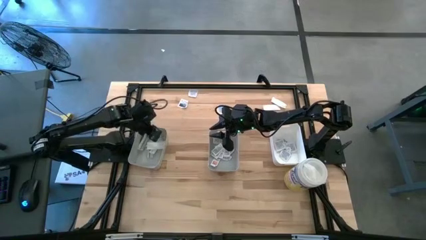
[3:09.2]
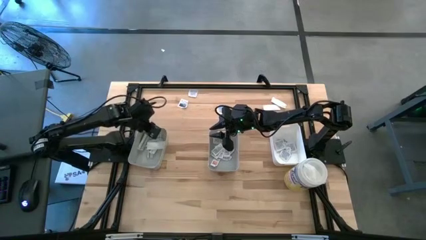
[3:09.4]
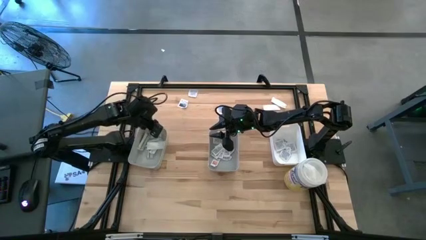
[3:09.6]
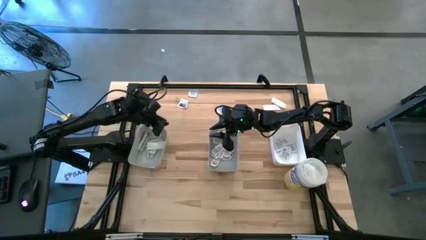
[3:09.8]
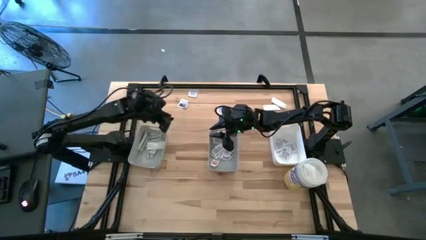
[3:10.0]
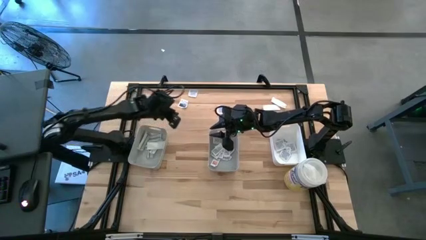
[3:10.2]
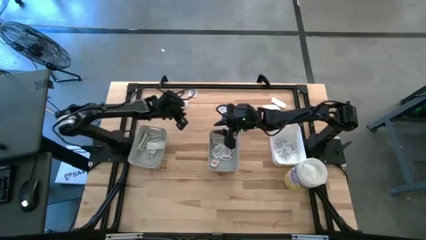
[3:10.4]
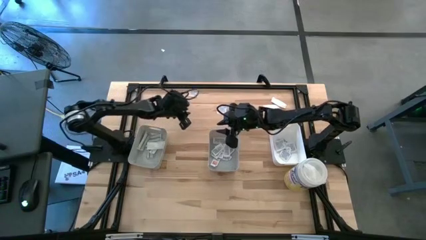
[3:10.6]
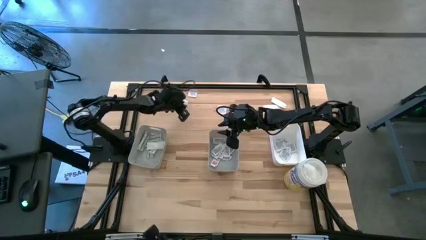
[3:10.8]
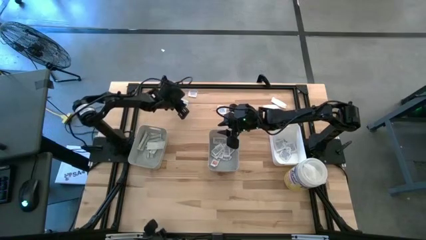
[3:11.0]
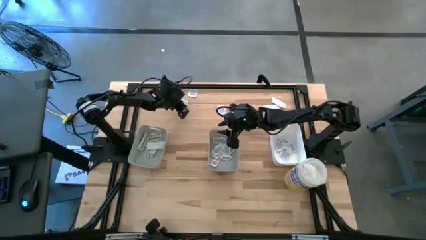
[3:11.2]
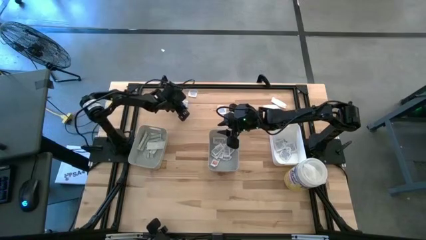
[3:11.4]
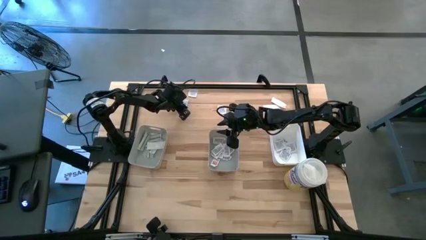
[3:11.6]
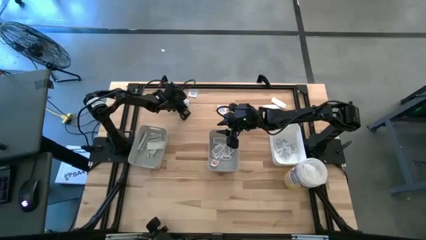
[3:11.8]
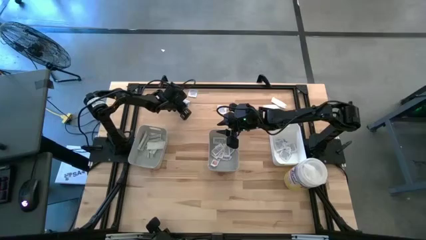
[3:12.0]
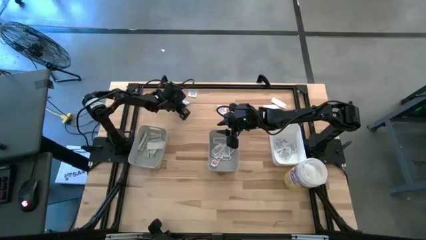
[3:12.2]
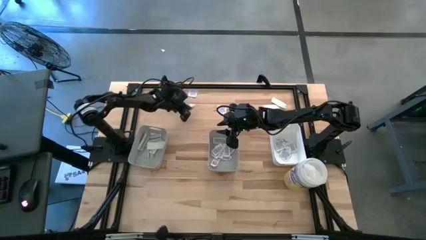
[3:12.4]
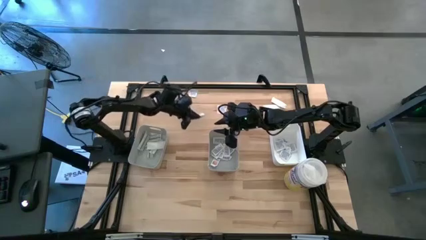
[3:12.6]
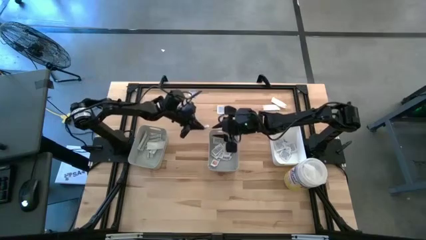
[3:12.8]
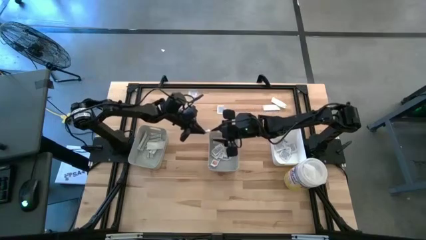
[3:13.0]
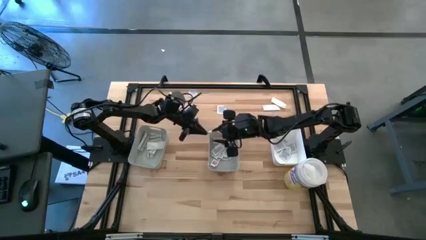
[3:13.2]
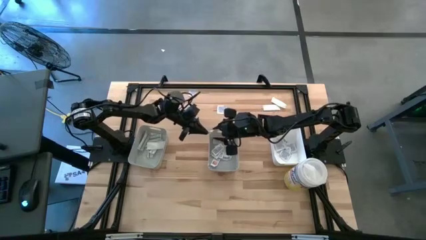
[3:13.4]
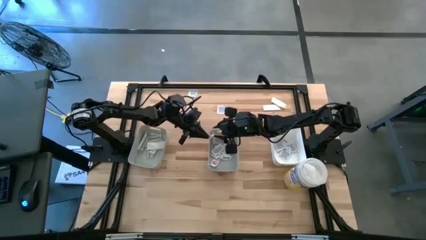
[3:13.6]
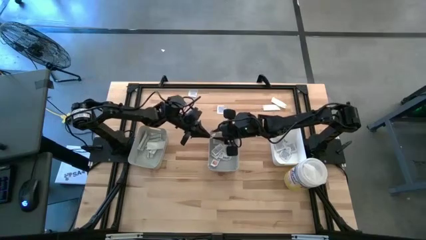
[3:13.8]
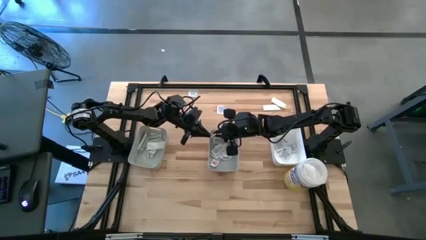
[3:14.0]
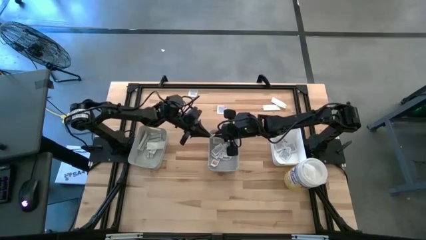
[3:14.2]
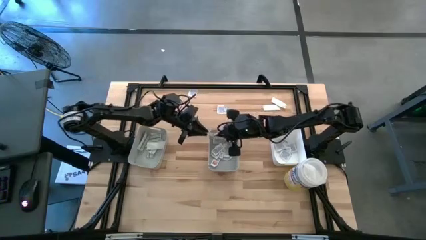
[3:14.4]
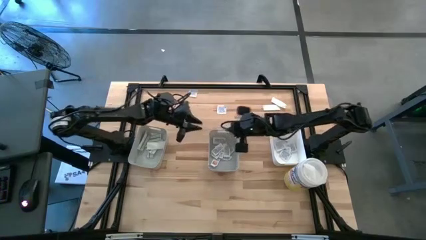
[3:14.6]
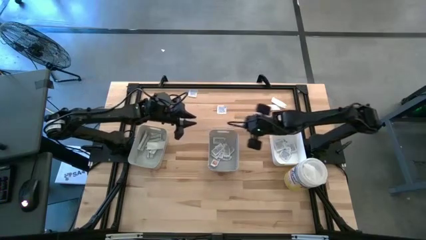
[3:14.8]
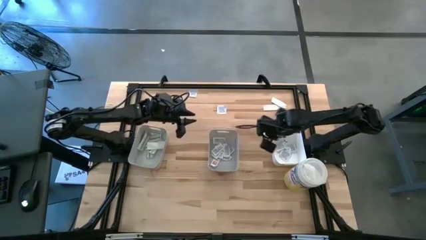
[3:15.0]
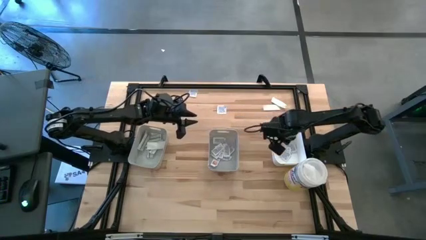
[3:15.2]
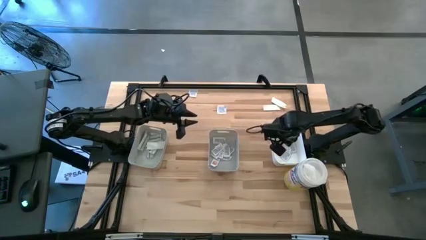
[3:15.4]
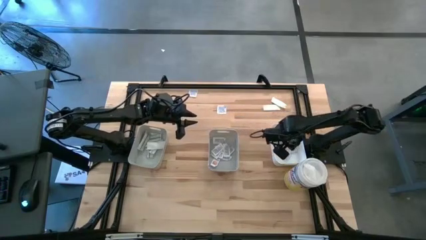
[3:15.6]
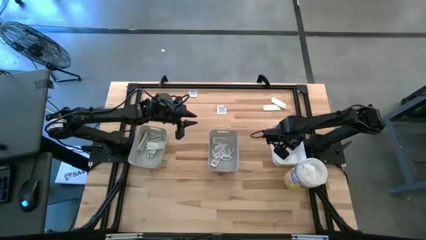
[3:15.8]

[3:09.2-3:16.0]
Task: Pick & Place First Aid Supplies
Put the alcohol pad into the white bin

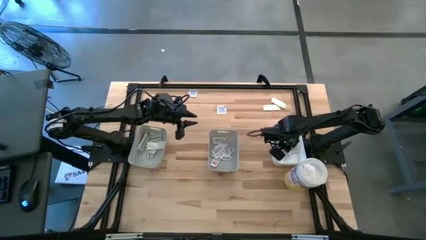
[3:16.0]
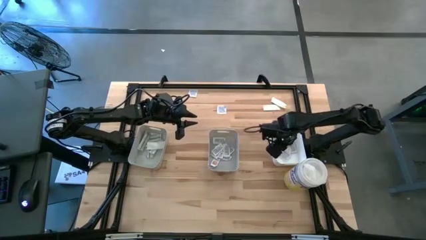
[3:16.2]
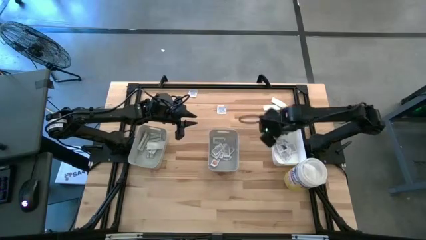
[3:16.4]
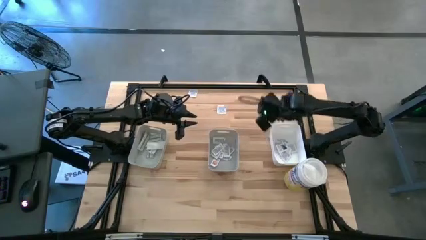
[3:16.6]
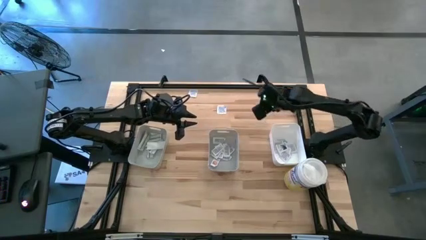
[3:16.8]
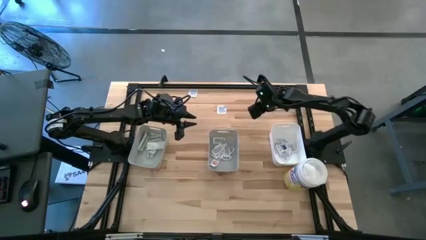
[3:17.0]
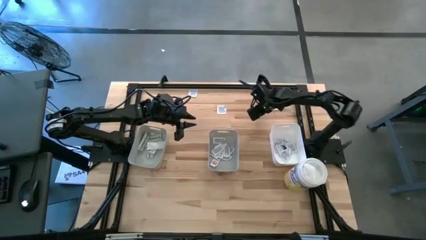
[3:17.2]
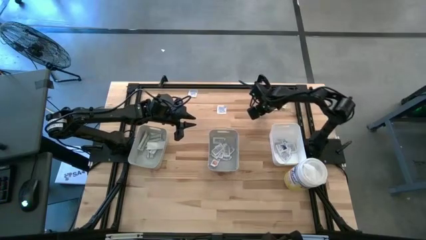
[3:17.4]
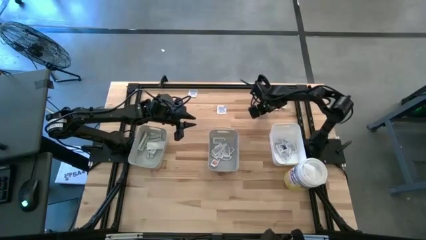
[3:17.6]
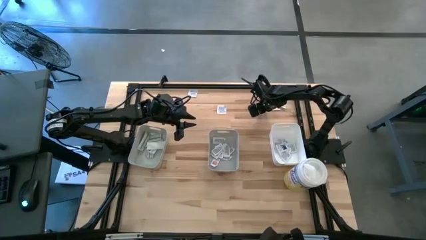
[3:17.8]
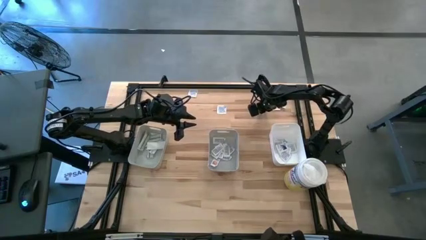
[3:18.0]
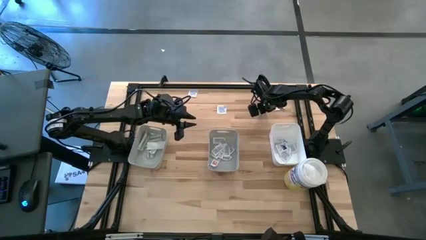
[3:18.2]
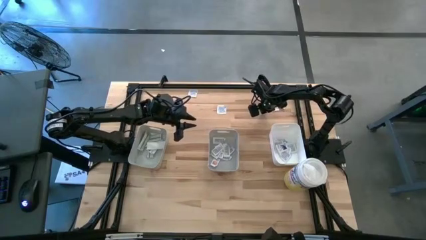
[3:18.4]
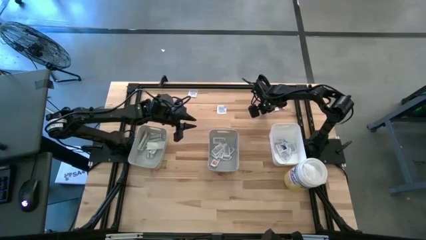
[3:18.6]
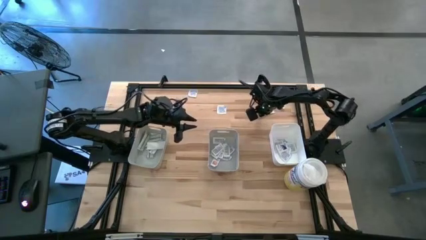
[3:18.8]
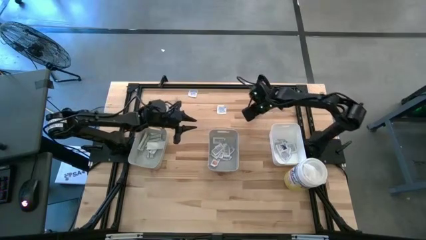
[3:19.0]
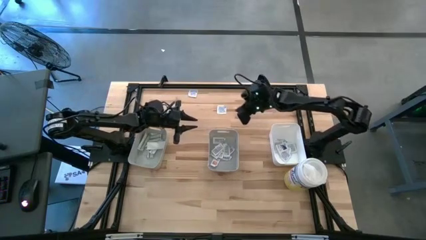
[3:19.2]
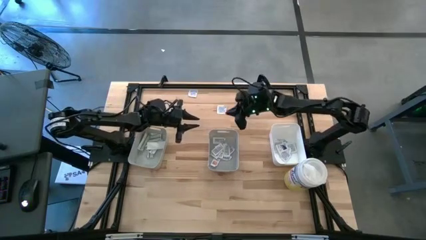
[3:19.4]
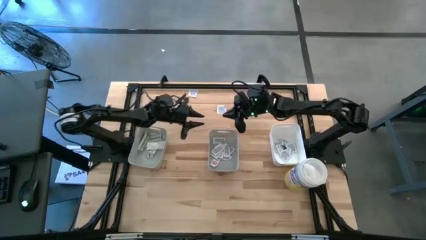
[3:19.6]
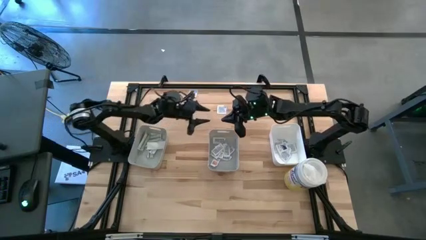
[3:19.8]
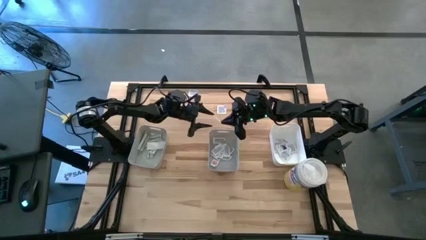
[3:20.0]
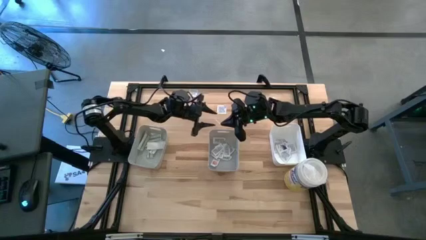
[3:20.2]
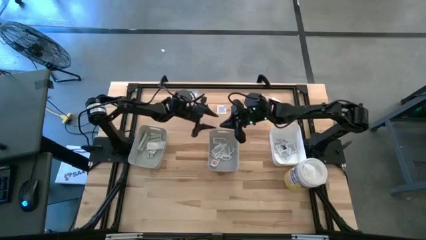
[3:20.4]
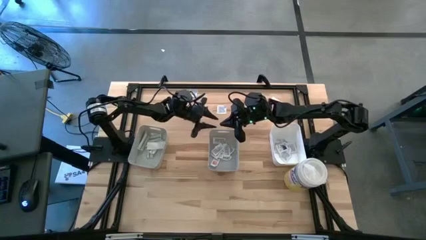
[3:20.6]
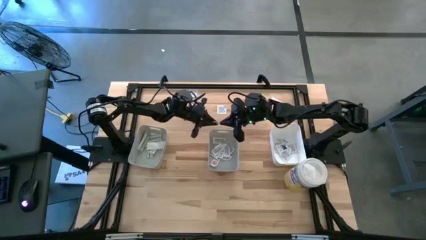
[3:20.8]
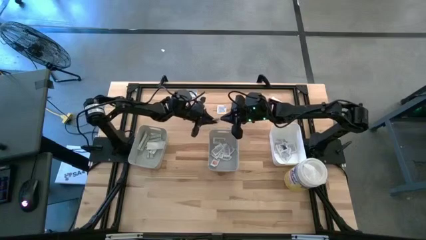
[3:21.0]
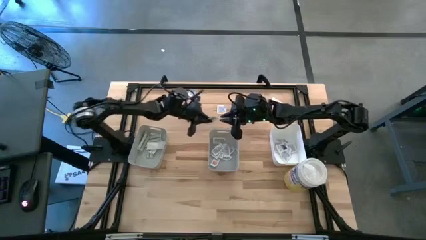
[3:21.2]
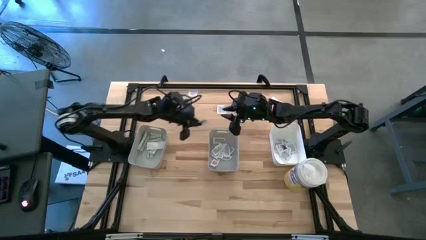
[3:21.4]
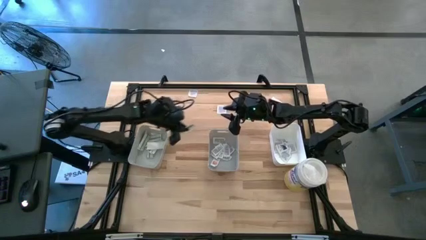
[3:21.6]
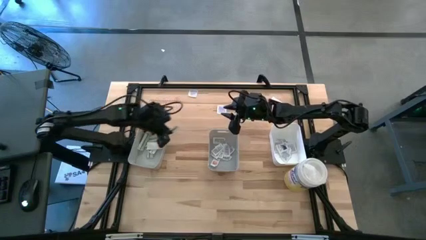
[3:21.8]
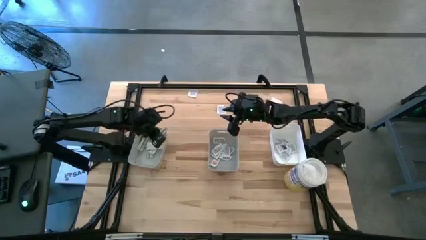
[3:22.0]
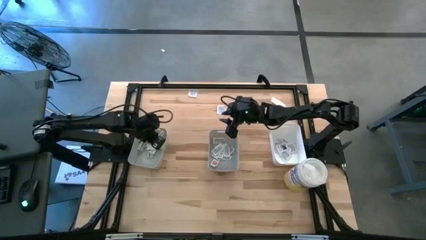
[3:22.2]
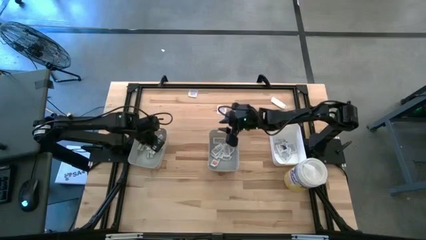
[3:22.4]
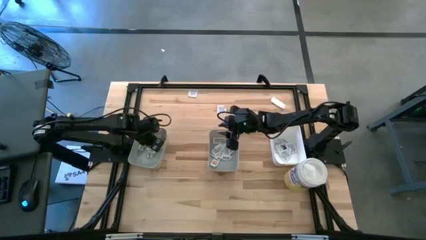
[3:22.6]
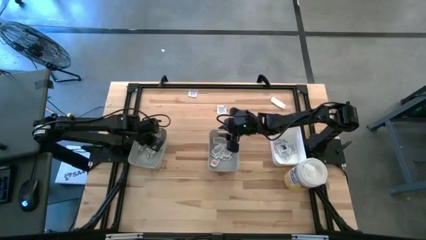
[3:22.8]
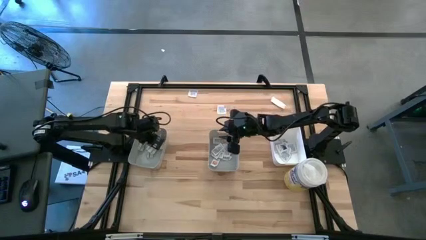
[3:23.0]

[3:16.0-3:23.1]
Put the bandage pack into the left gray bin

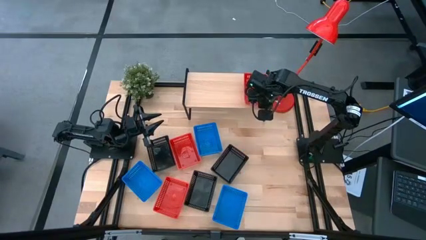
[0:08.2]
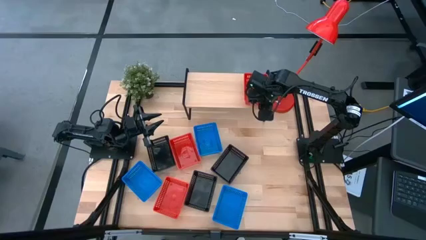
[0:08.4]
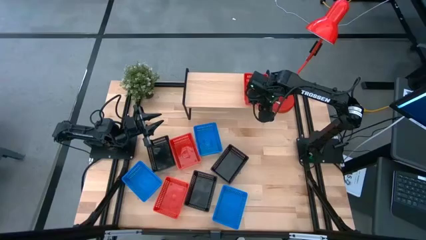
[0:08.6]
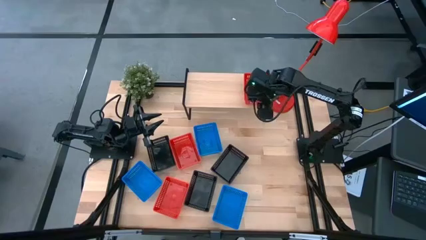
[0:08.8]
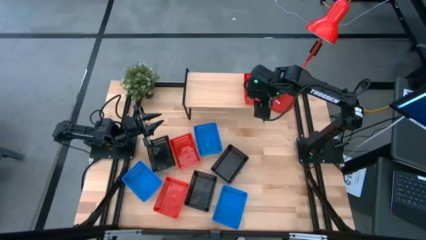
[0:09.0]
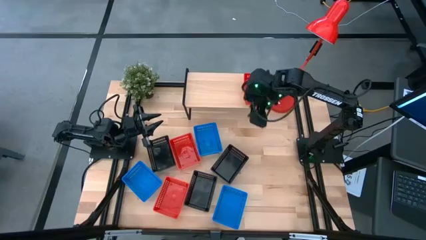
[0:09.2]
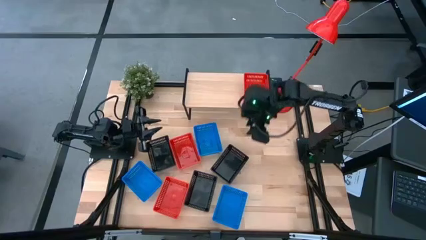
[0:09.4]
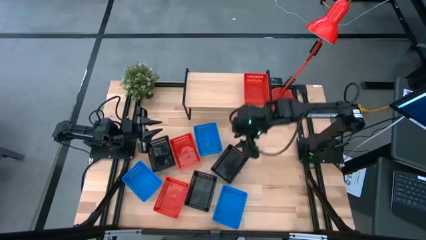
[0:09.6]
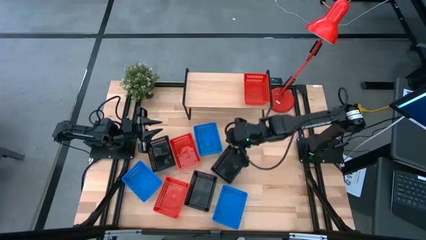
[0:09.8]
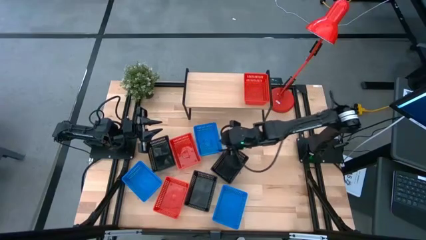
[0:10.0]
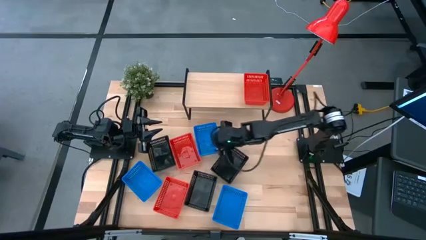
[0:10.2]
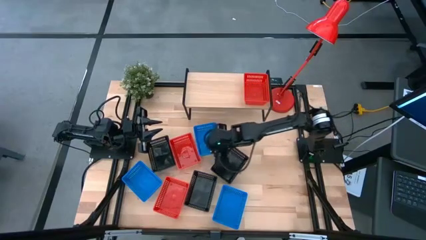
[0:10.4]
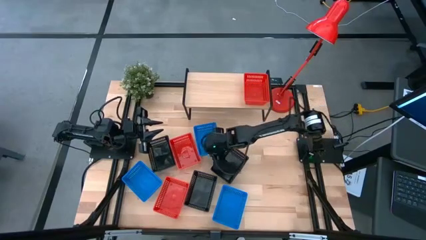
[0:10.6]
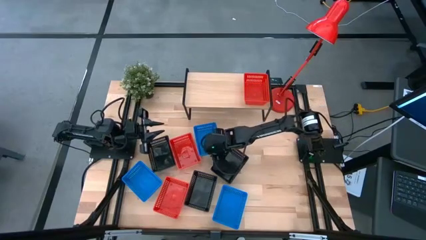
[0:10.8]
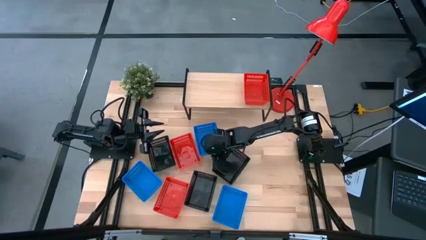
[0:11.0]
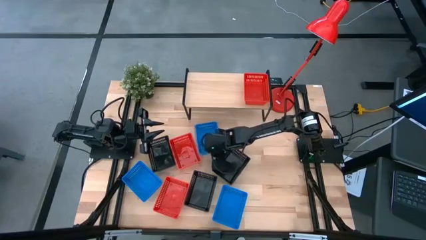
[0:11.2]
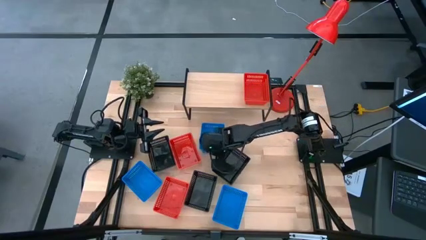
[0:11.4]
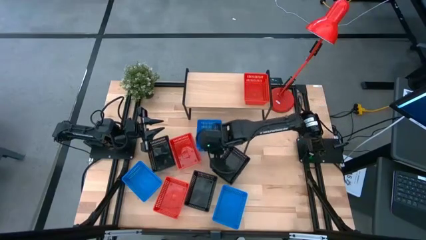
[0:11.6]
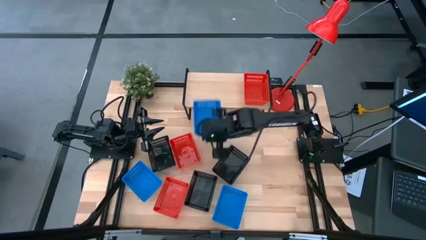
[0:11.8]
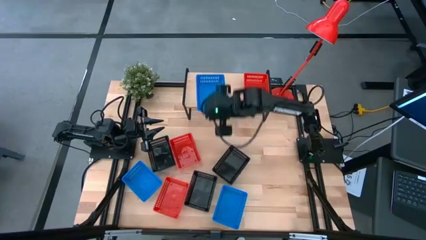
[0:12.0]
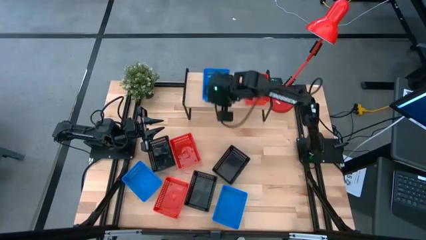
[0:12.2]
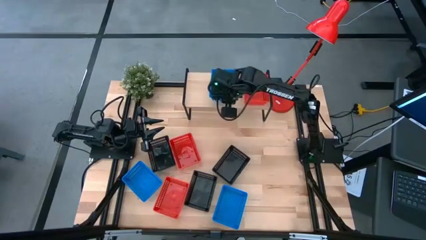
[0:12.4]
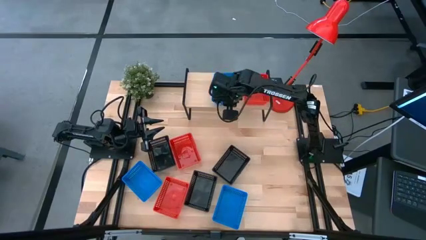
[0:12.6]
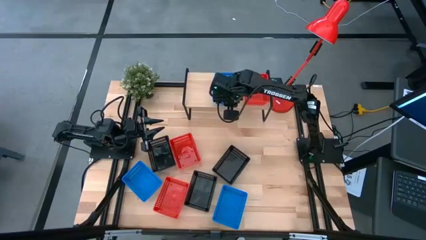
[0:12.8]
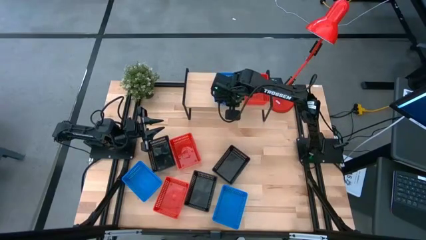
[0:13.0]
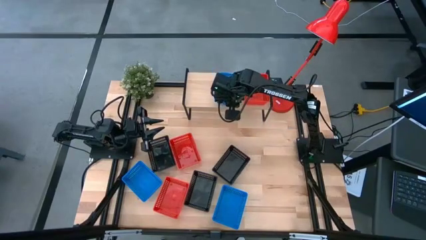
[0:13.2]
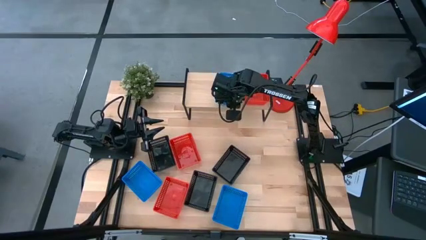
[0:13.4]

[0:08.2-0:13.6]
Task: Stack baskets on shelf by color
Put the top blue basket on the shelf
